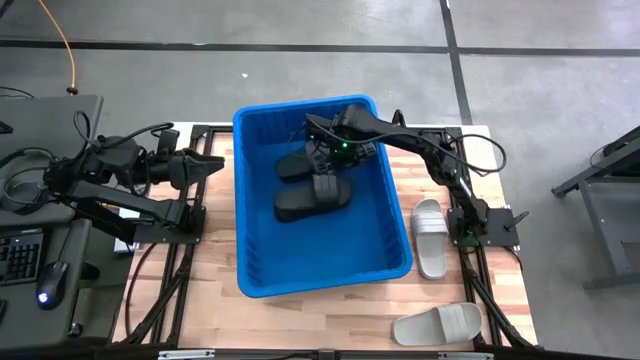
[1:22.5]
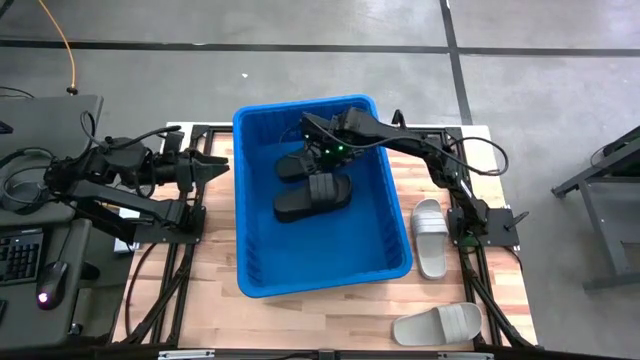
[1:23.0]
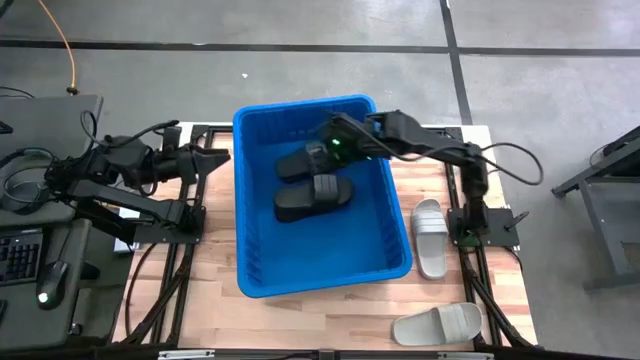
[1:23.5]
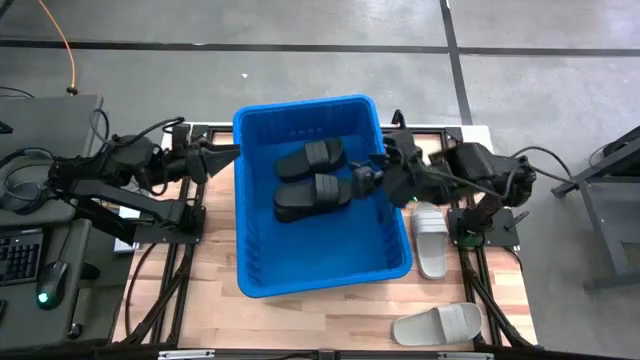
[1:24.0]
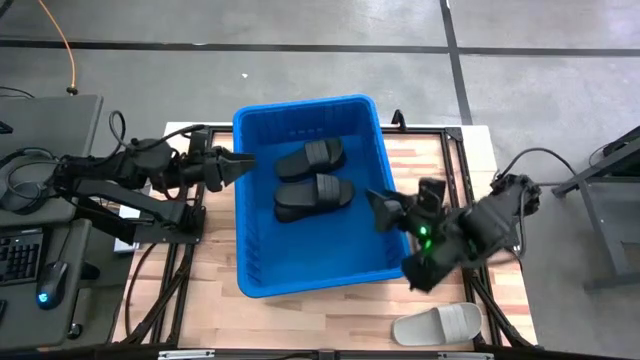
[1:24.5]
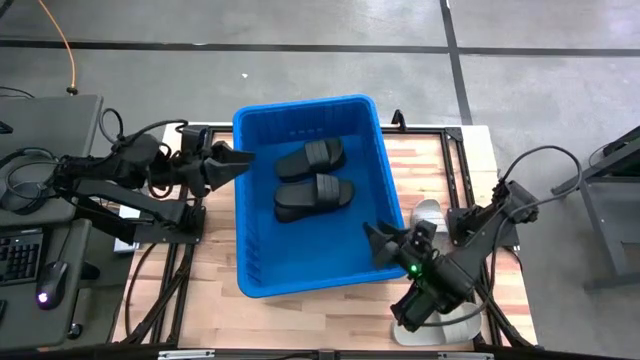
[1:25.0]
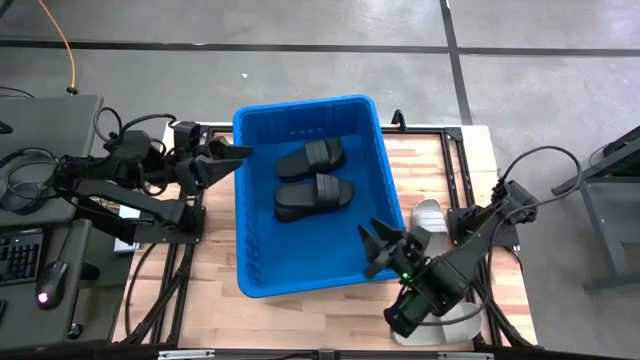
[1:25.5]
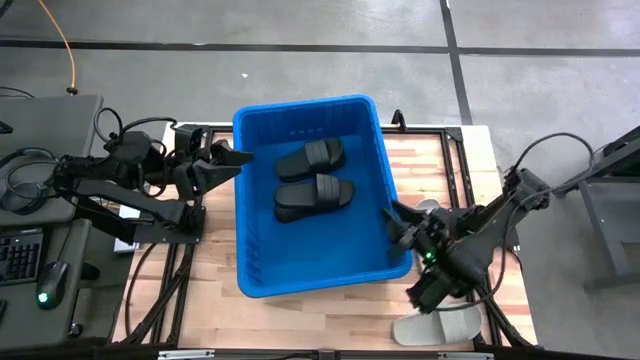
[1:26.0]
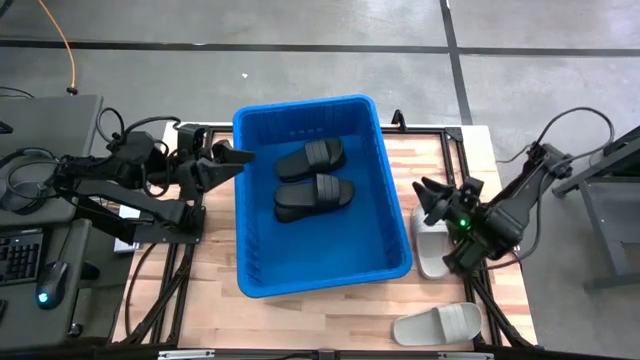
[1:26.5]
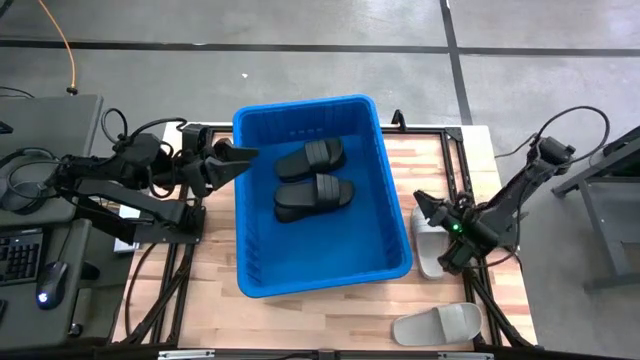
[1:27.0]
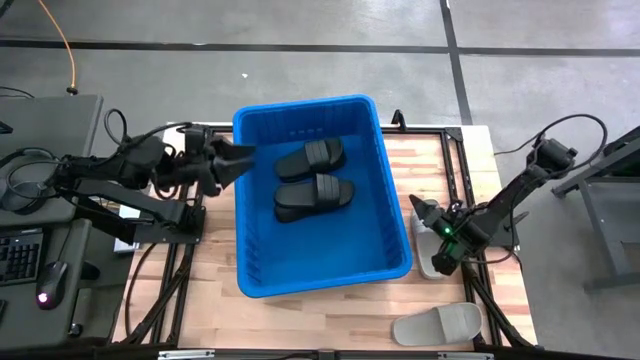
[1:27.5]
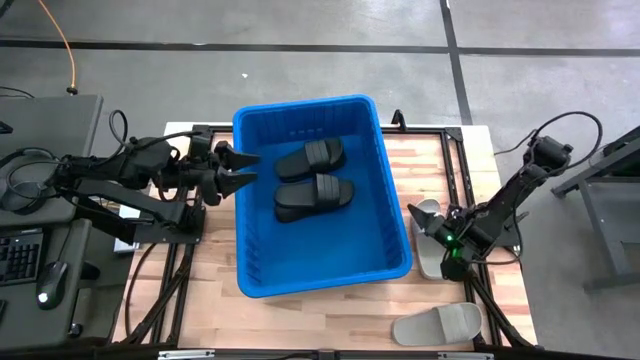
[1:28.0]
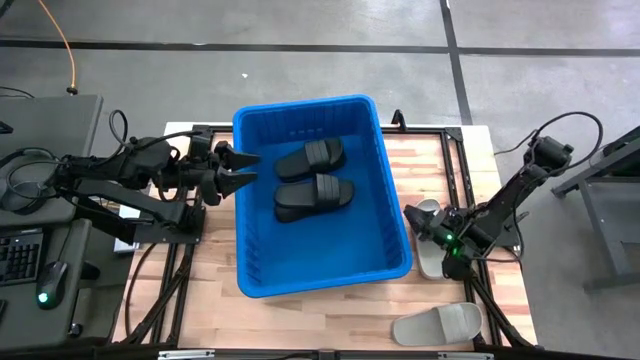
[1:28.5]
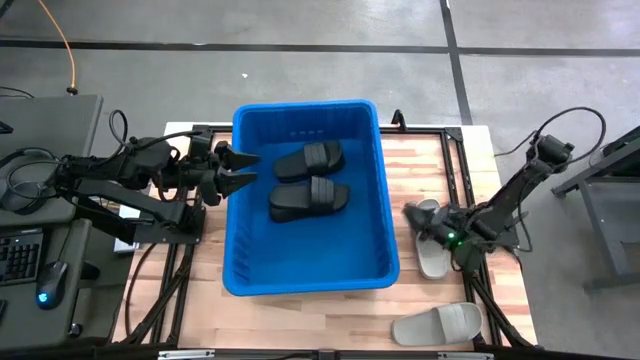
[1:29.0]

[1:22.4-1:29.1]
Task: Pick and place slides into bin
Adjust the blue container

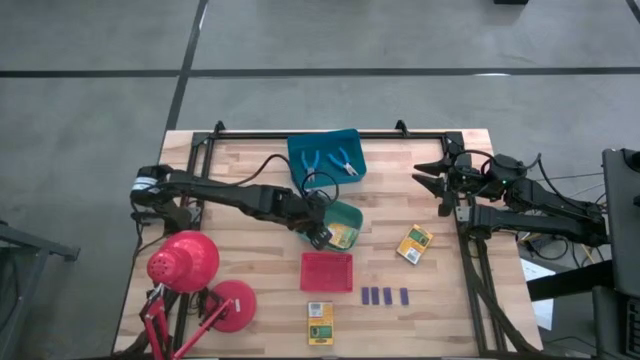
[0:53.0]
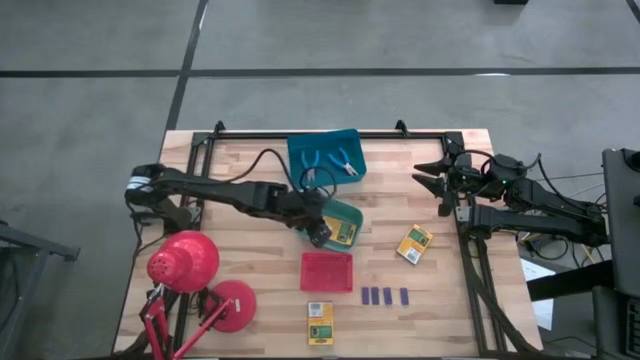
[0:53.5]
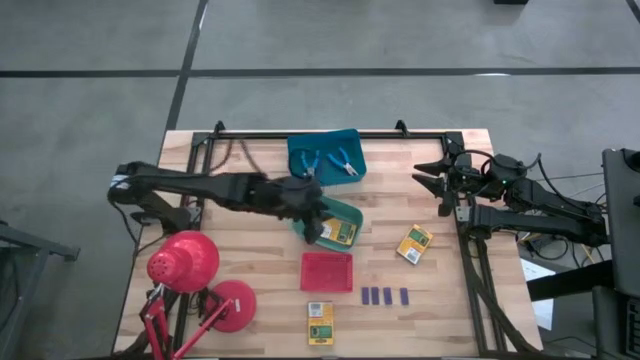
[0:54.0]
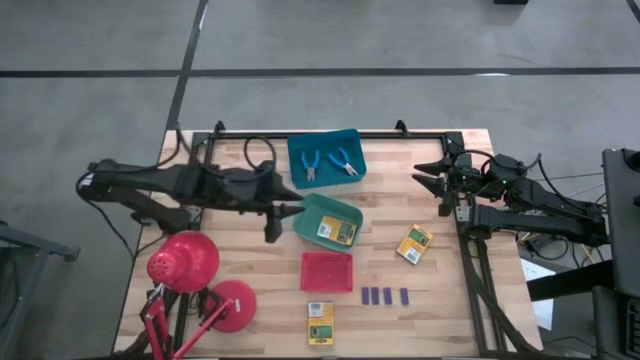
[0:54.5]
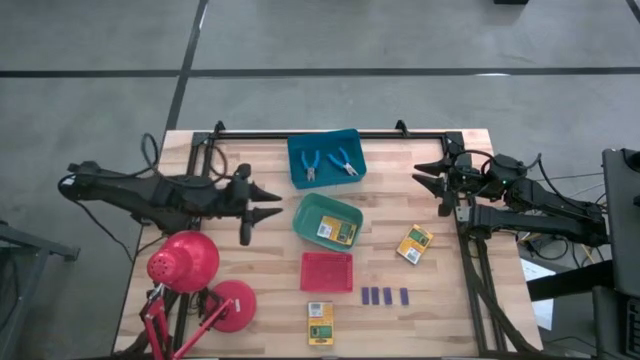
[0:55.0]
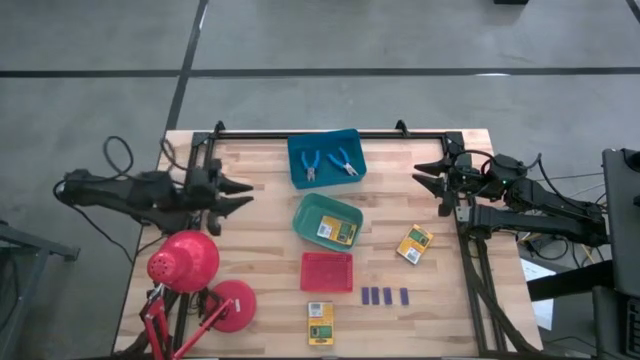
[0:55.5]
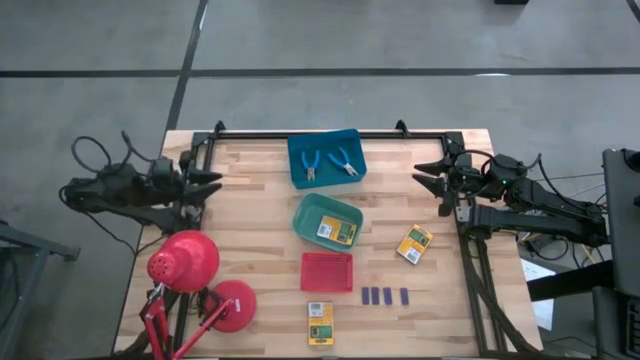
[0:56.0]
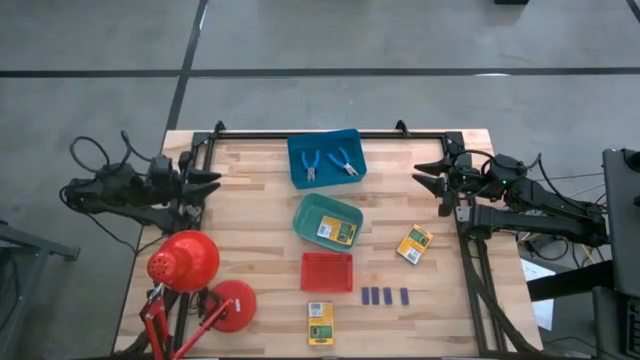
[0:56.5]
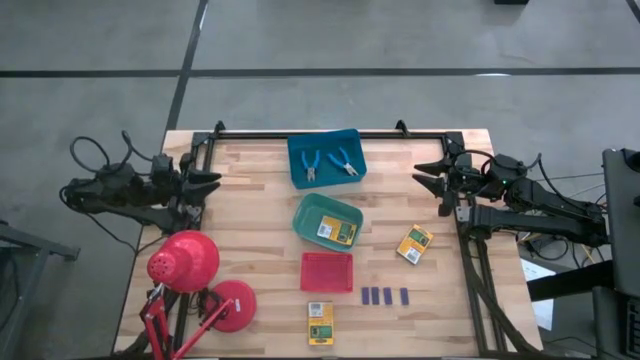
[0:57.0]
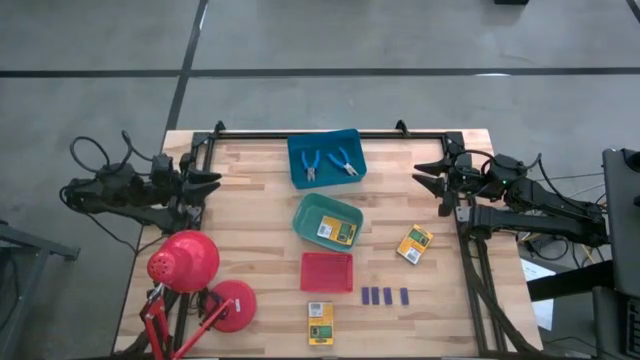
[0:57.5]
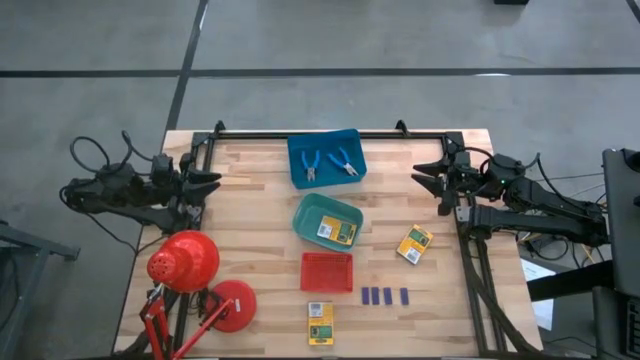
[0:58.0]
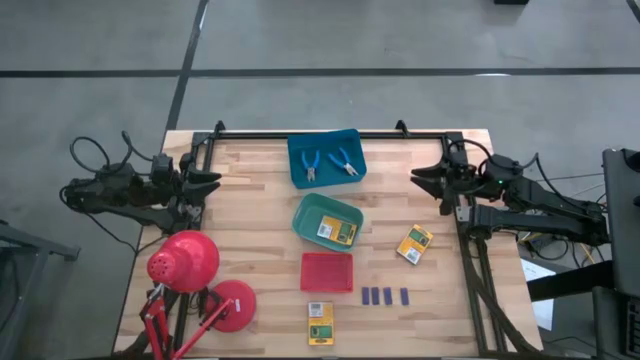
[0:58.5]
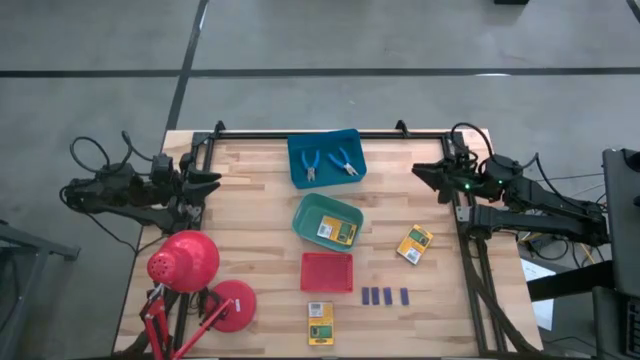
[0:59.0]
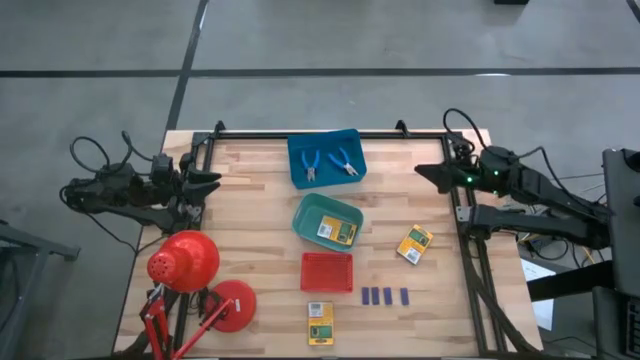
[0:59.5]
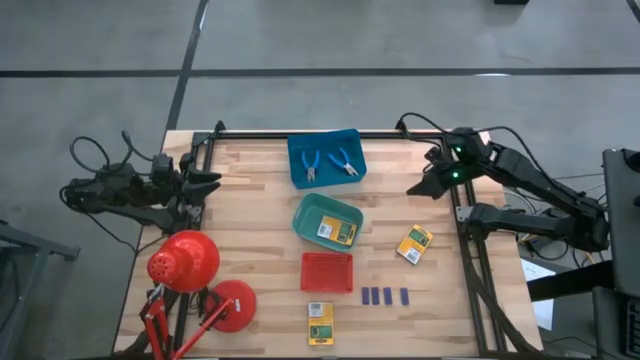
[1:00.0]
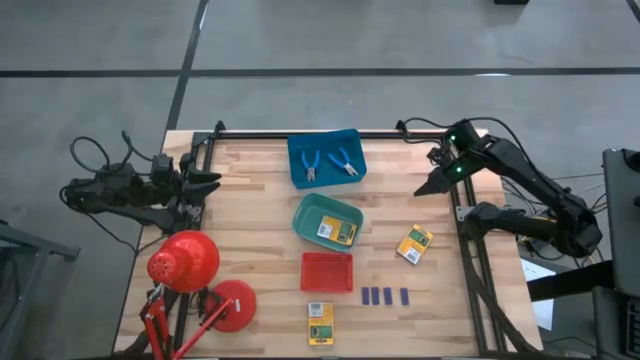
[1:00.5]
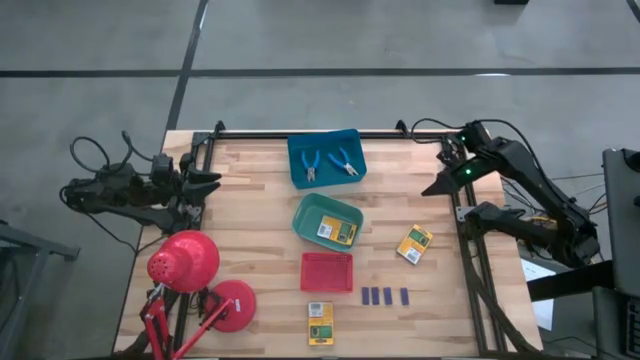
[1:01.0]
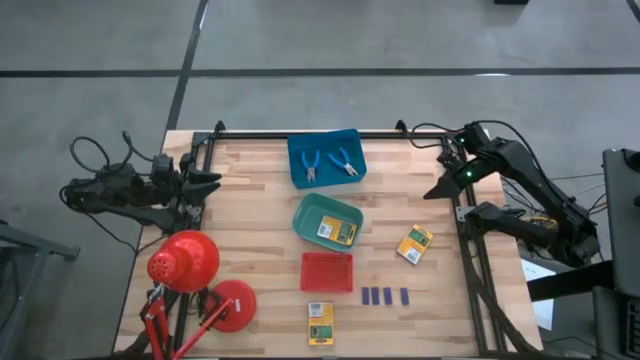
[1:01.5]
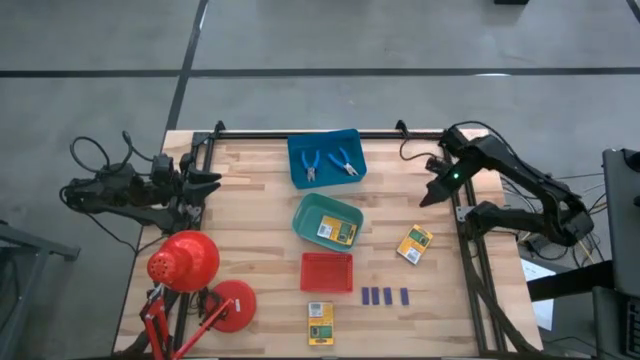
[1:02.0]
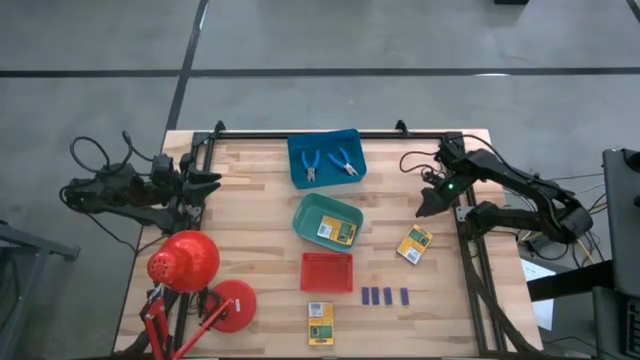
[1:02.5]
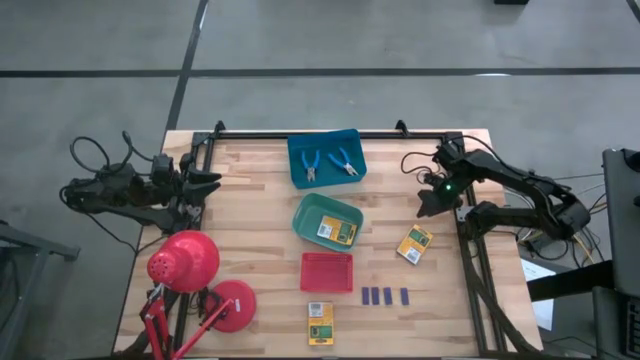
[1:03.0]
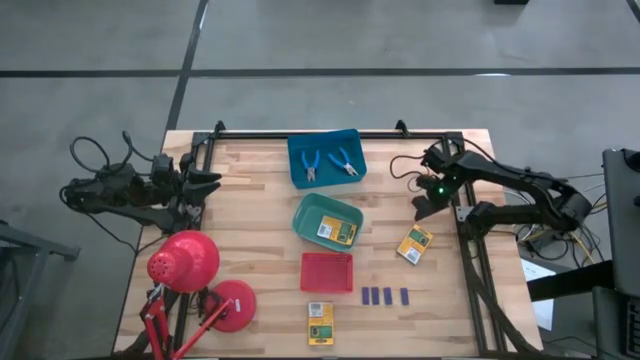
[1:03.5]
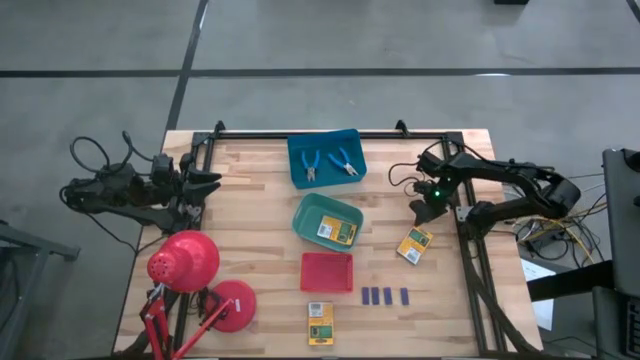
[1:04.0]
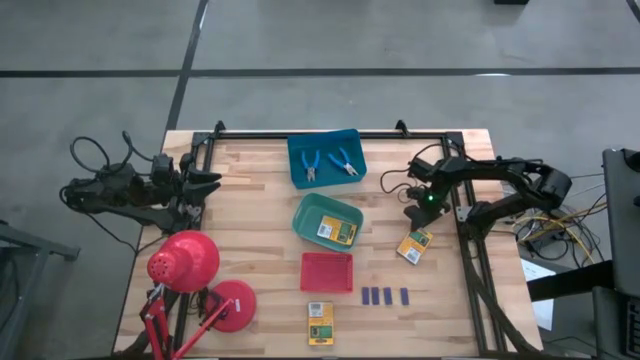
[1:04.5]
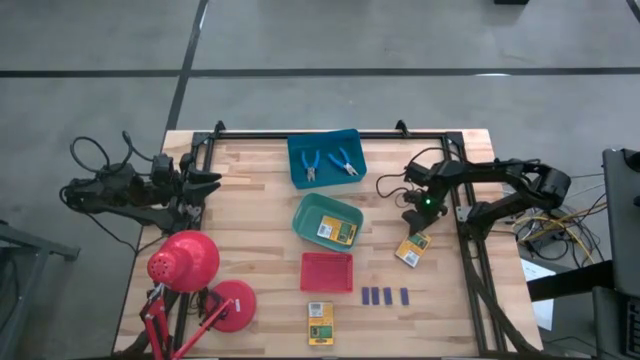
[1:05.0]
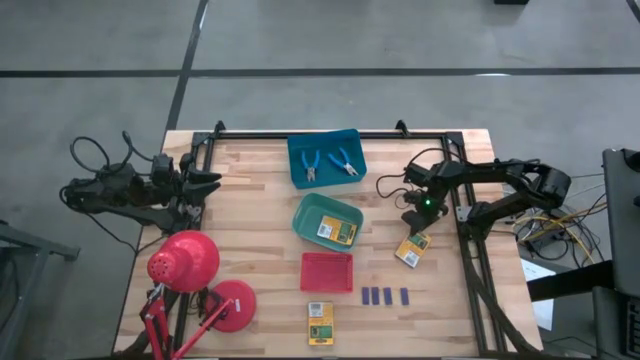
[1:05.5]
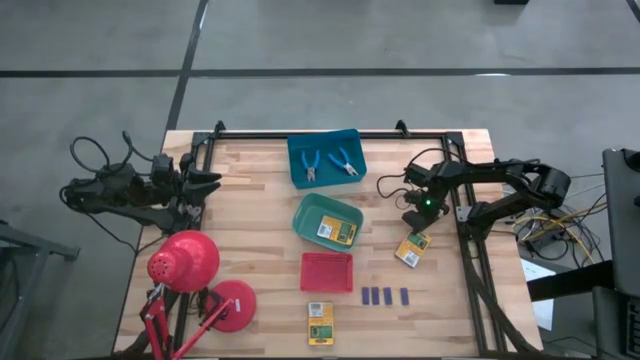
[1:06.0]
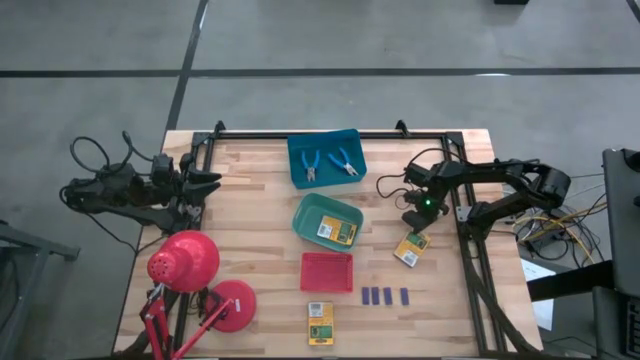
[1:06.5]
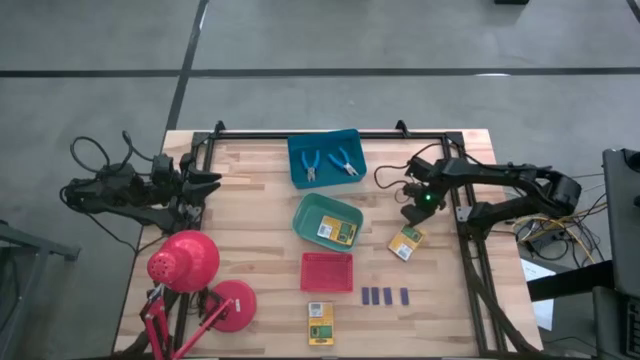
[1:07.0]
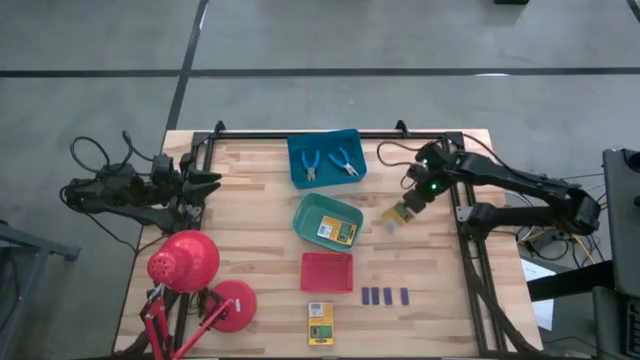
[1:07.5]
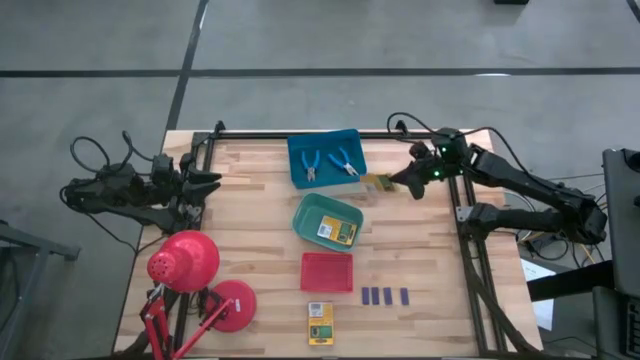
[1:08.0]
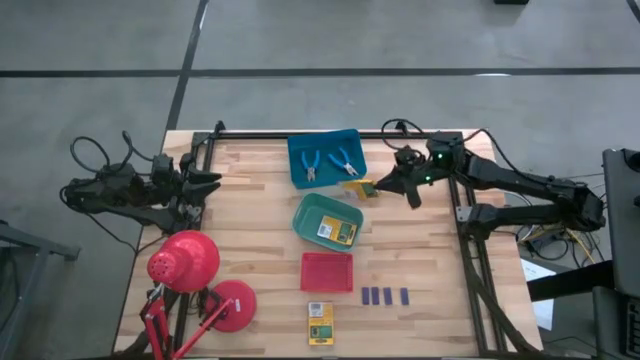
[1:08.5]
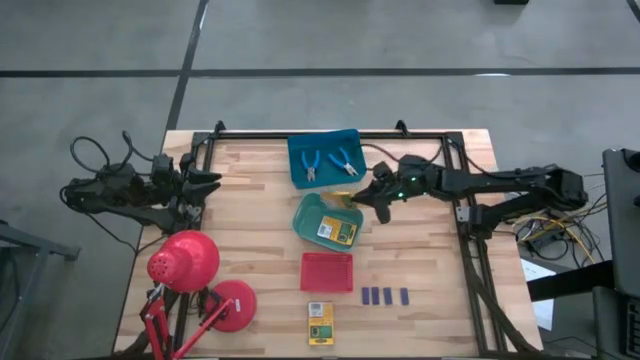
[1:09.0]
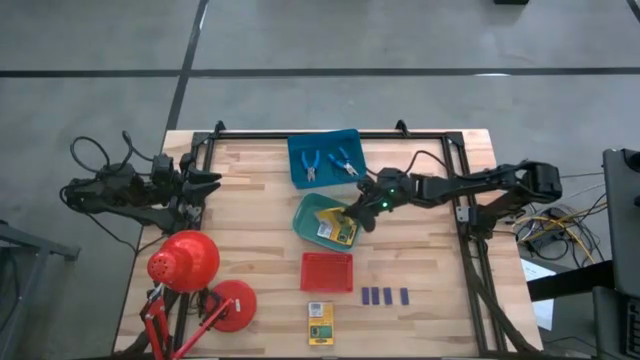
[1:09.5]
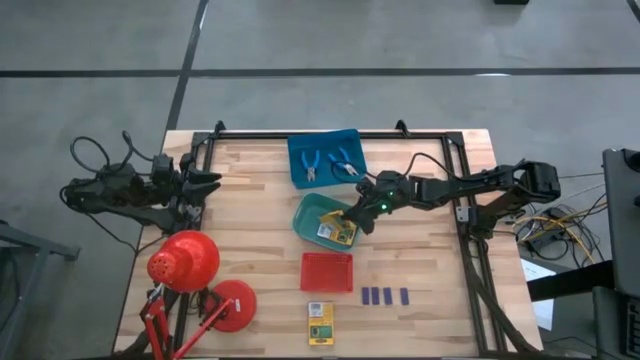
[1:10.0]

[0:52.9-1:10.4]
Task: Pick & Place School Supplies
Put the yellow crayon box in the green bin
